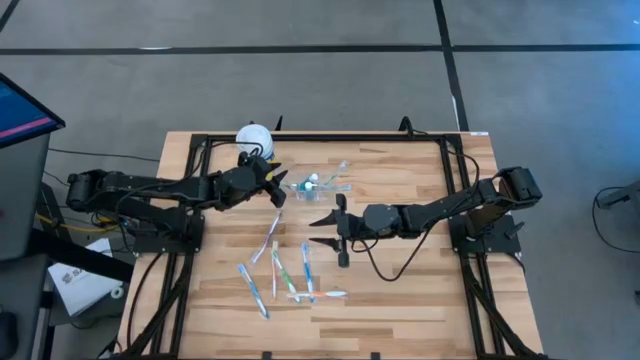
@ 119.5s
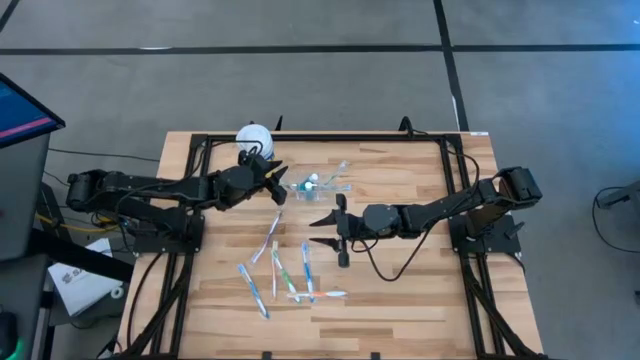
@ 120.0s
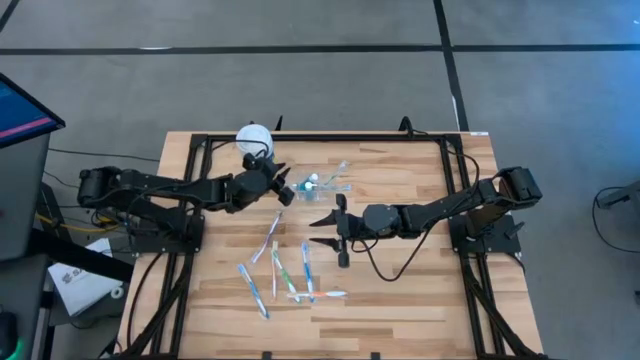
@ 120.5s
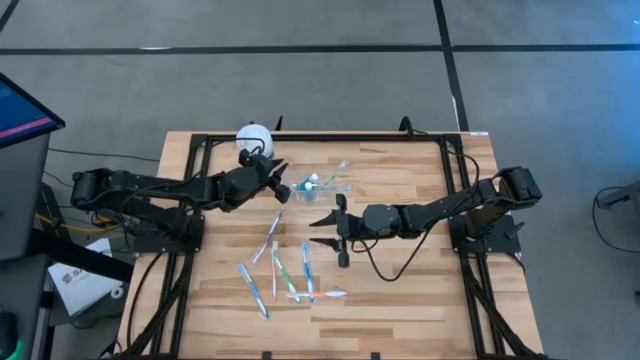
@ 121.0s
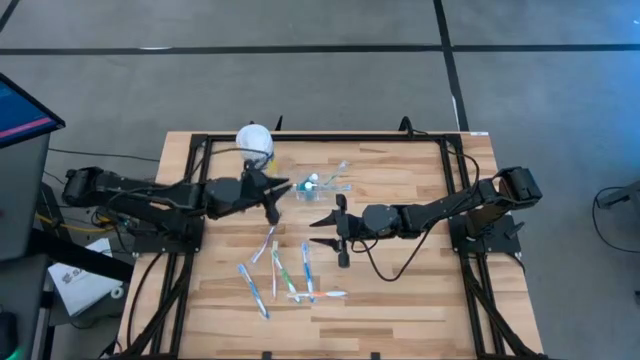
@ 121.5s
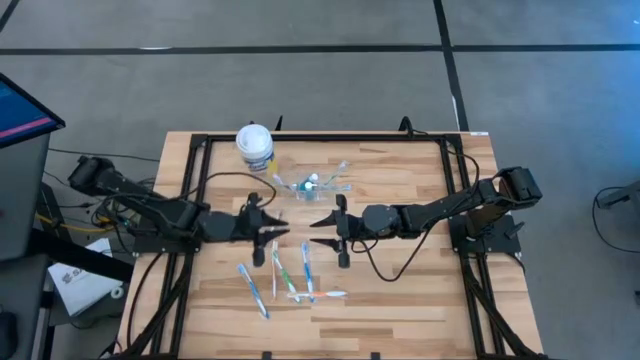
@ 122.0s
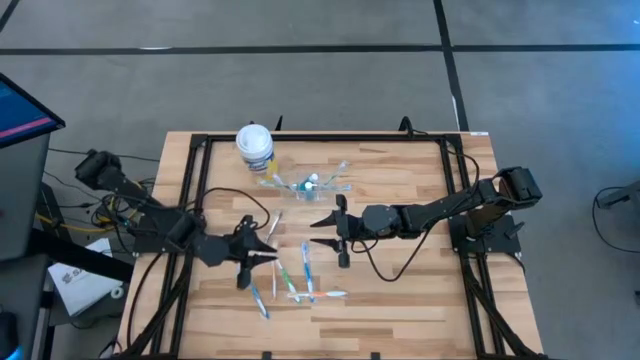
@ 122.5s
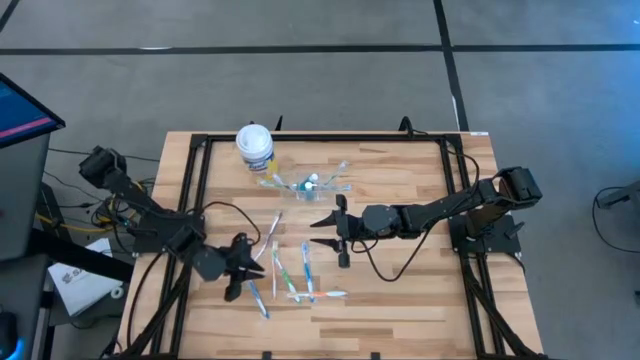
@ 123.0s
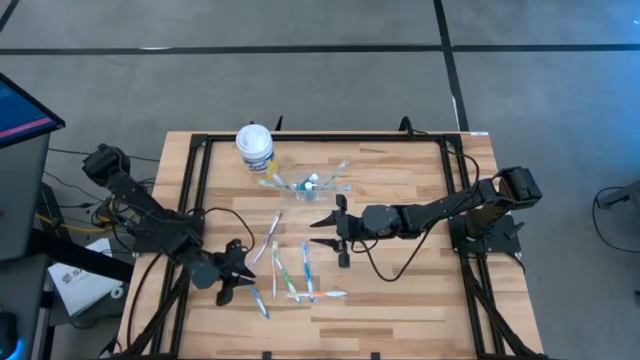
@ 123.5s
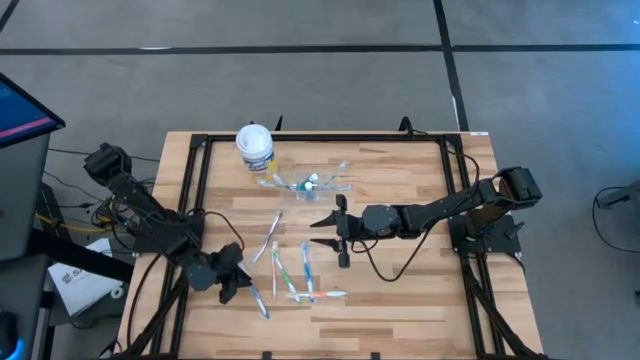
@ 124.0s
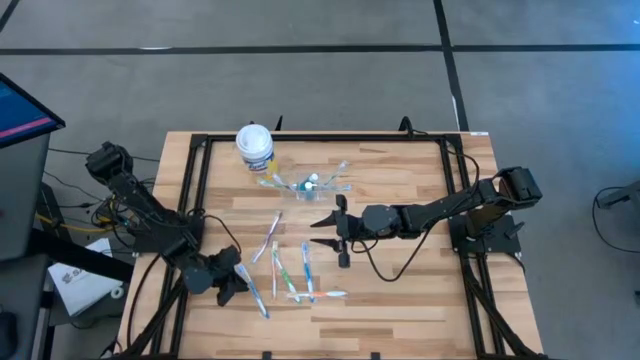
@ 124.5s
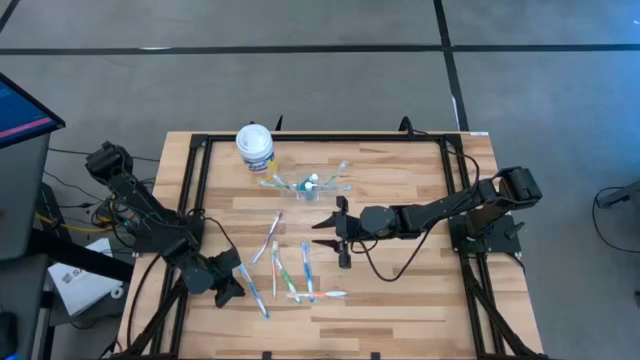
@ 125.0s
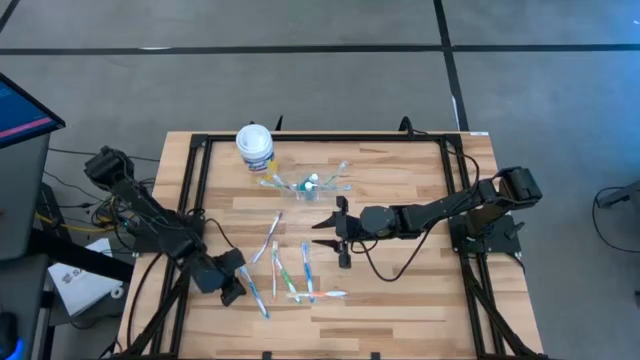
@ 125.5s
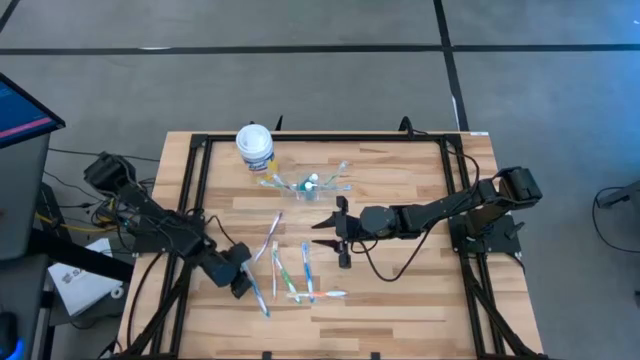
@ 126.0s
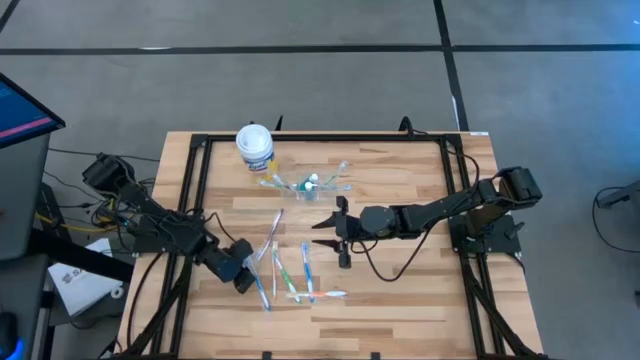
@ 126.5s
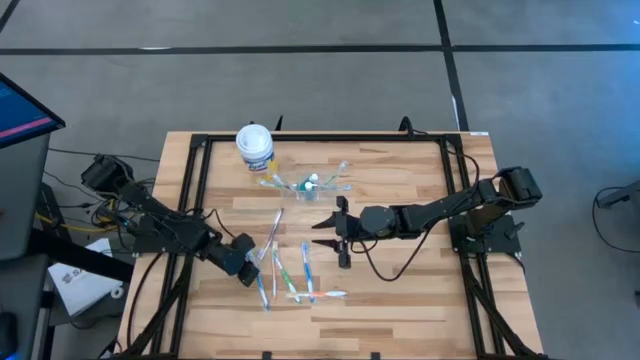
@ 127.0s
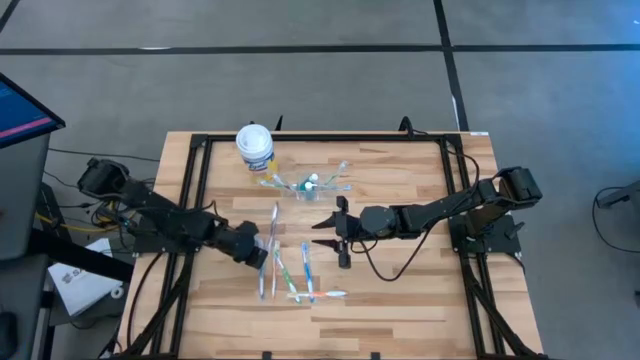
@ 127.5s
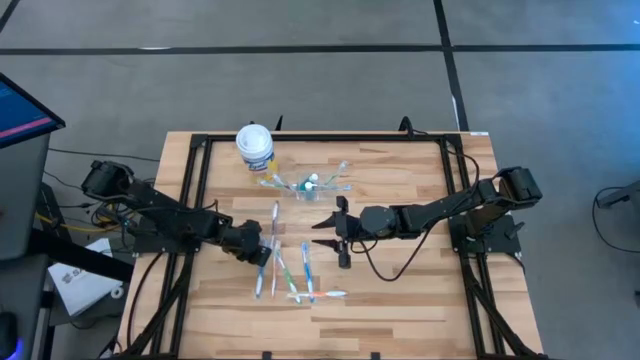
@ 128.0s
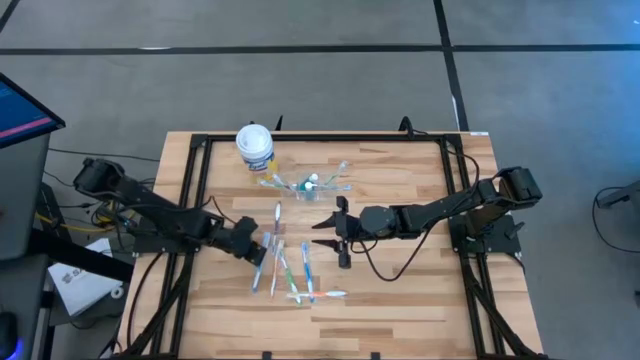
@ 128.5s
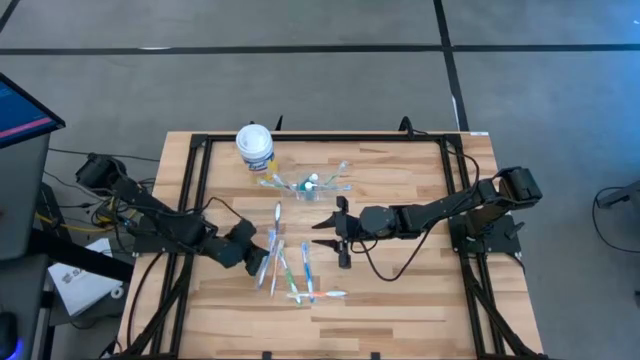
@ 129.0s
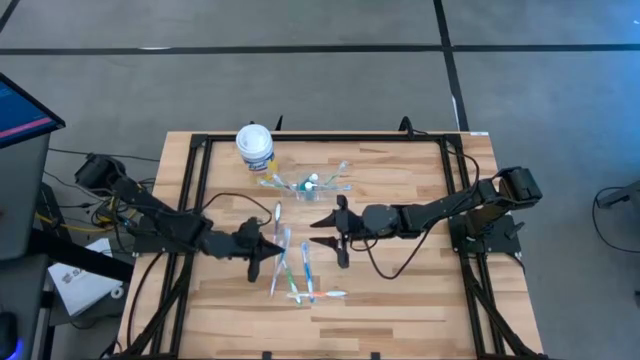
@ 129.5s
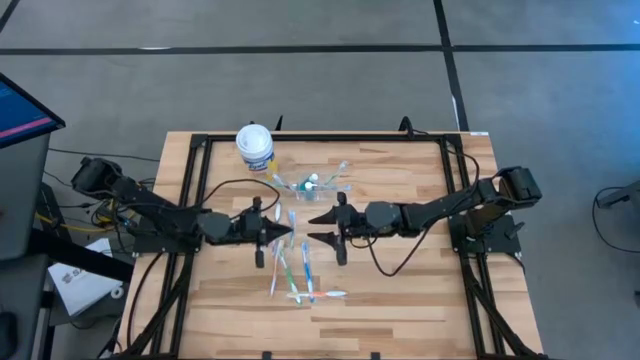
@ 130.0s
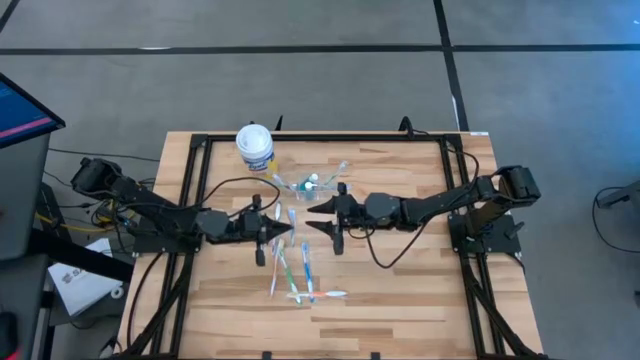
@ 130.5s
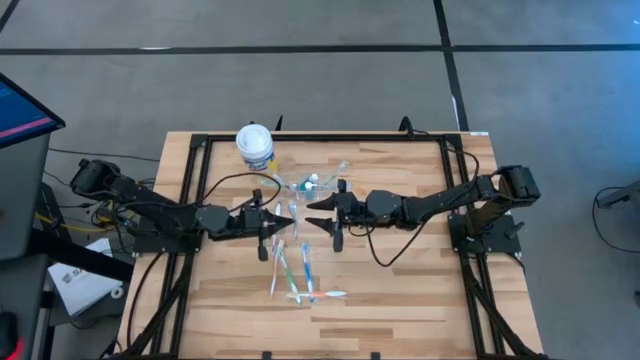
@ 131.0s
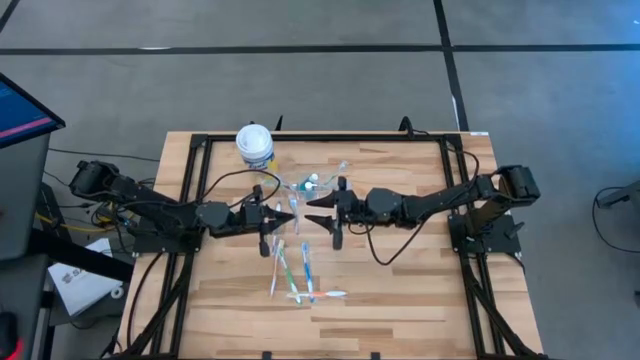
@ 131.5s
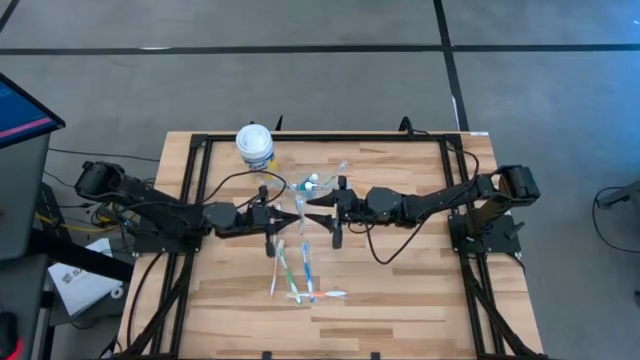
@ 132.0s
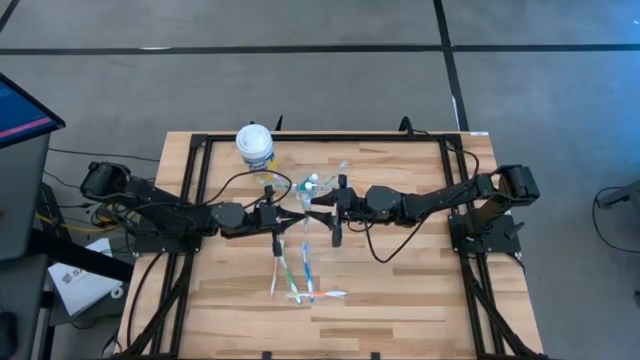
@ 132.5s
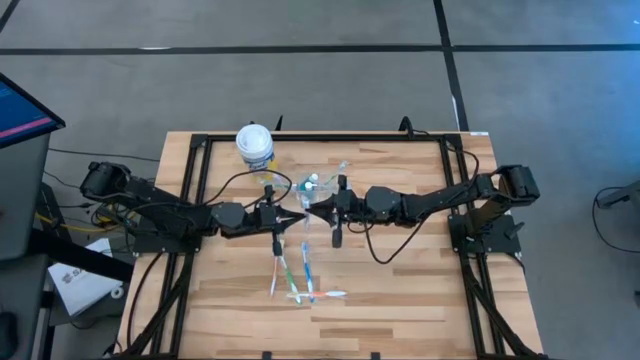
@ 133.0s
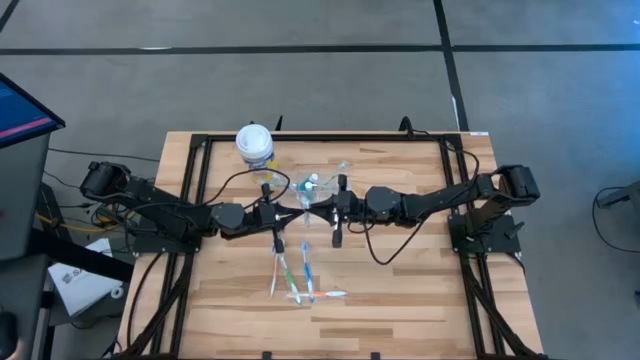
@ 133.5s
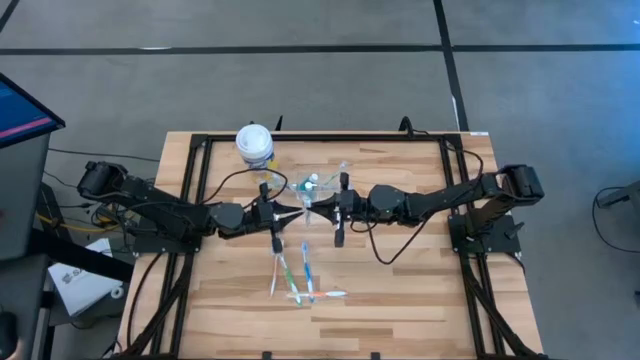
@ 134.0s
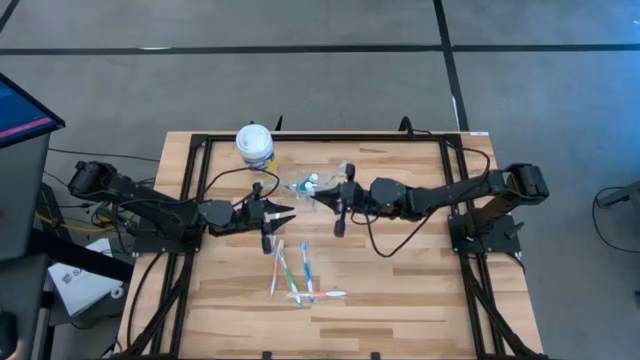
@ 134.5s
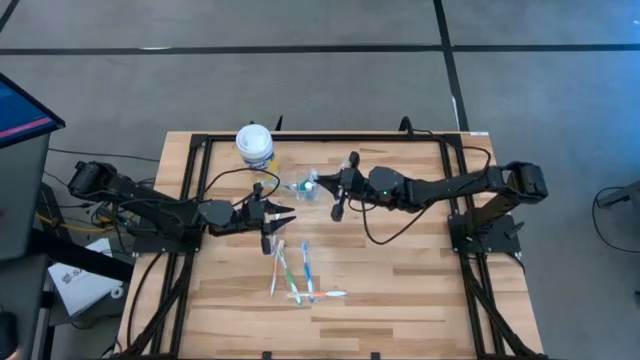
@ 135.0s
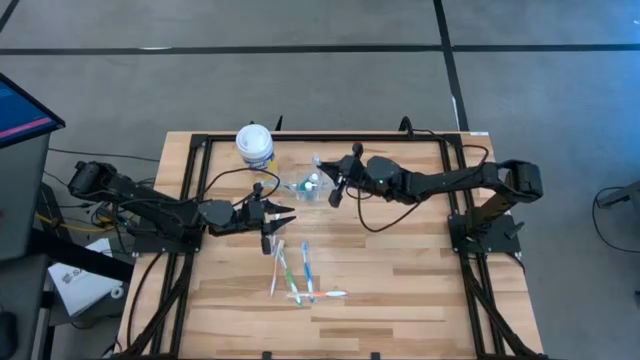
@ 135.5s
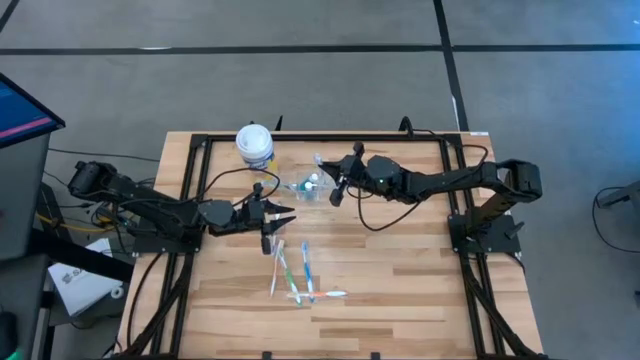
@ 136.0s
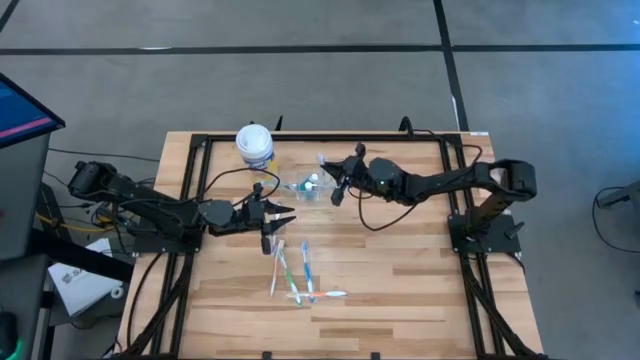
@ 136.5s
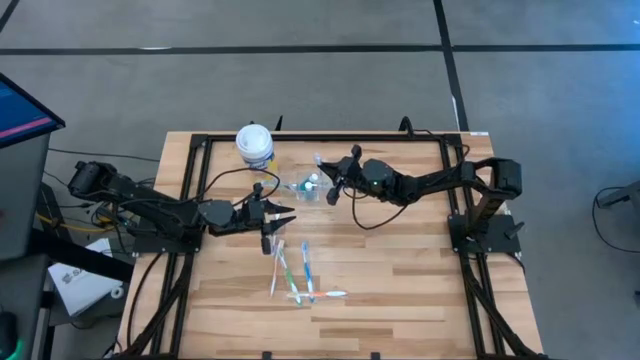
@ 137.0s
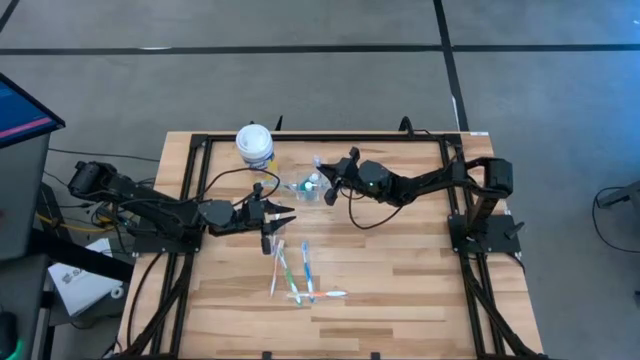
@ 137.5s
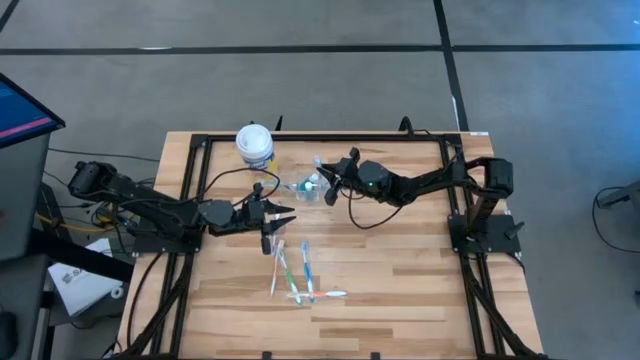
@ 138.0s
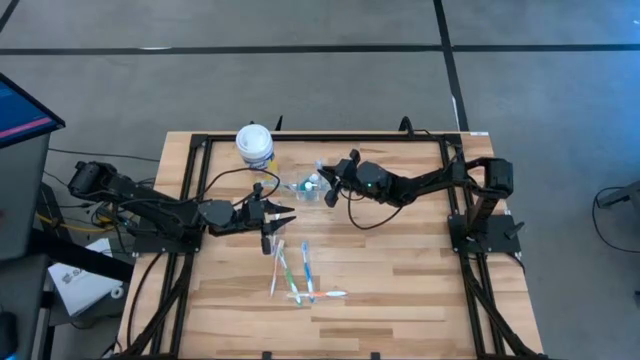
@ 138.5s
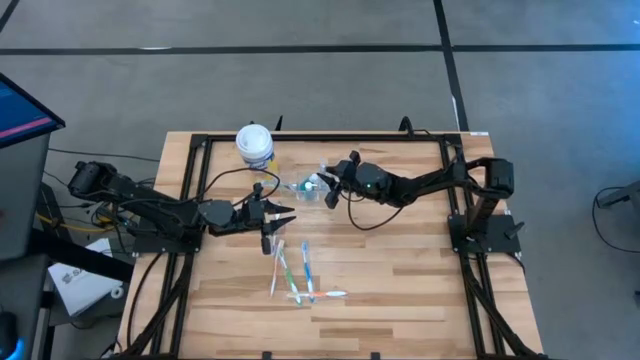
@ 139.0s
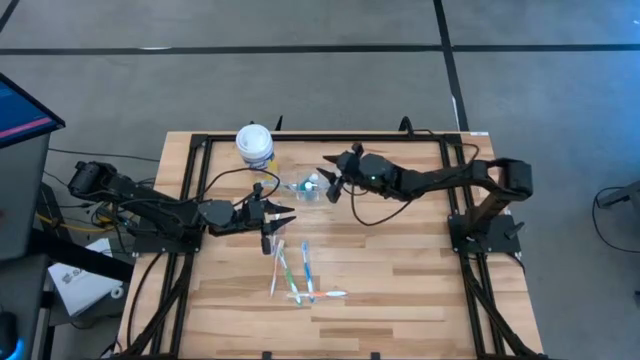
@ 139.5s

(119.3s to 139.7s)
Task: Pick & Place toothbrushing station
Put the blue toothbrush into the transparent organizer
